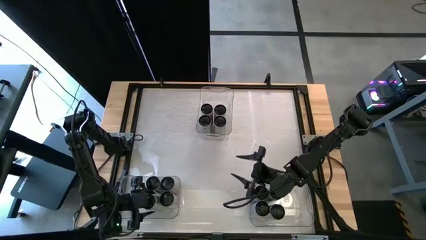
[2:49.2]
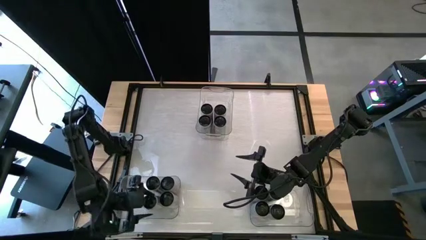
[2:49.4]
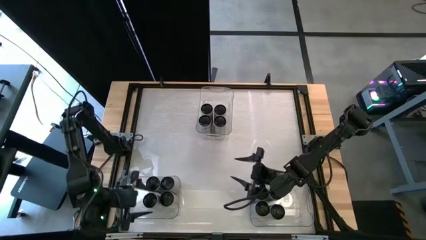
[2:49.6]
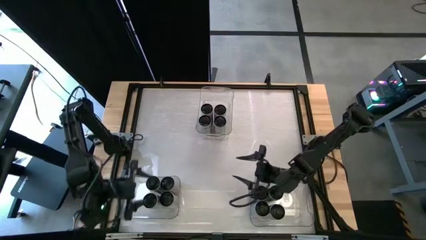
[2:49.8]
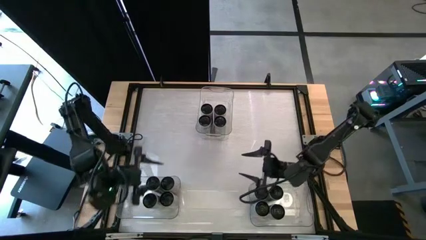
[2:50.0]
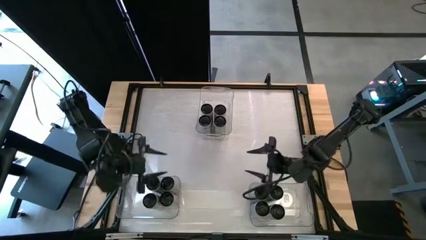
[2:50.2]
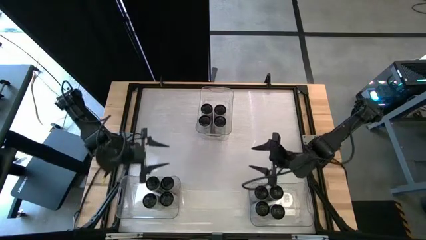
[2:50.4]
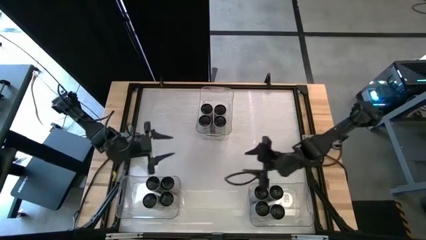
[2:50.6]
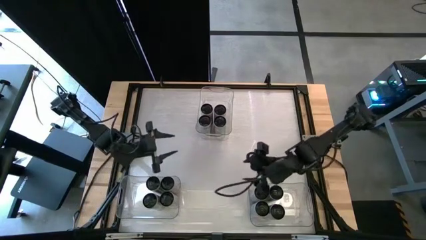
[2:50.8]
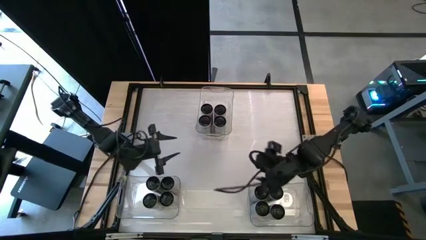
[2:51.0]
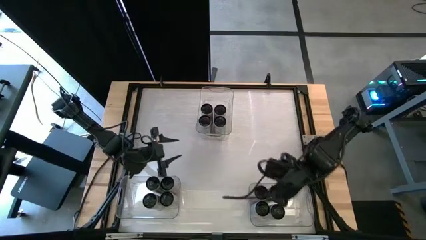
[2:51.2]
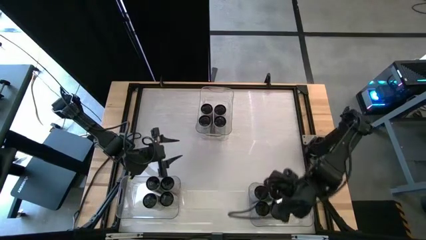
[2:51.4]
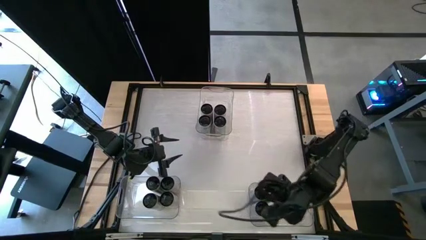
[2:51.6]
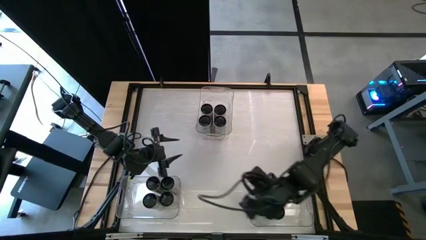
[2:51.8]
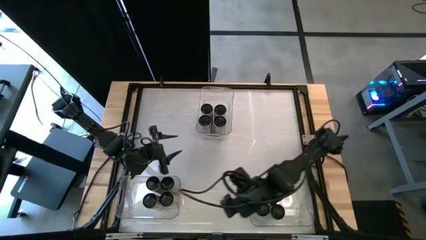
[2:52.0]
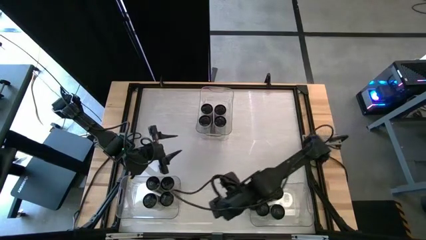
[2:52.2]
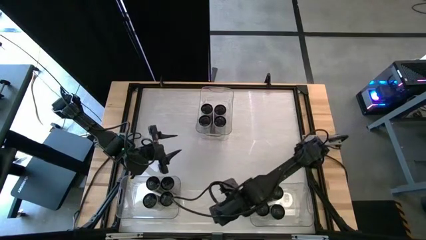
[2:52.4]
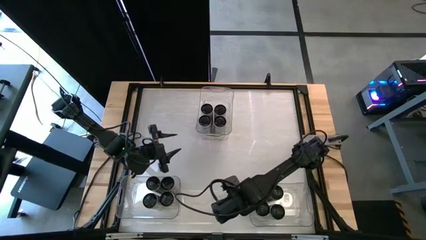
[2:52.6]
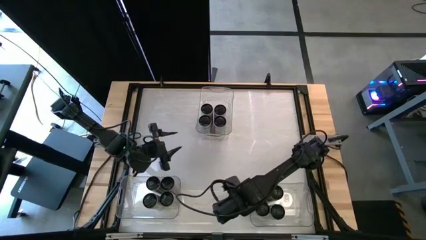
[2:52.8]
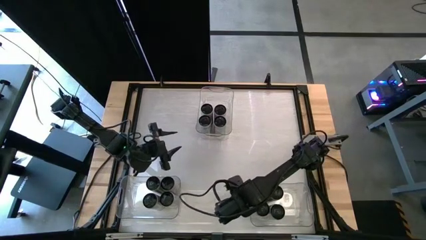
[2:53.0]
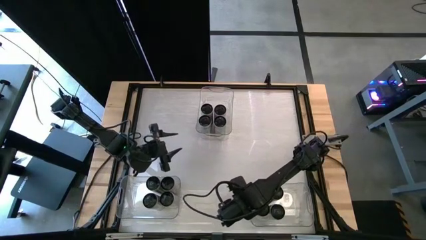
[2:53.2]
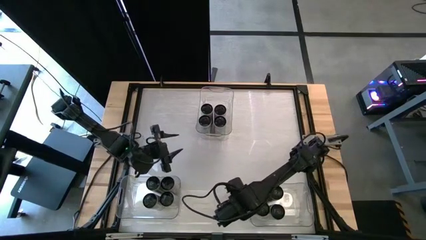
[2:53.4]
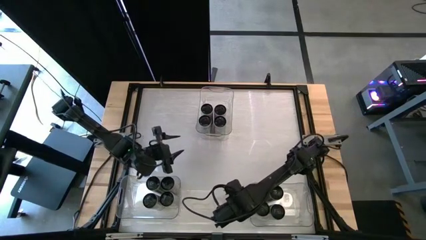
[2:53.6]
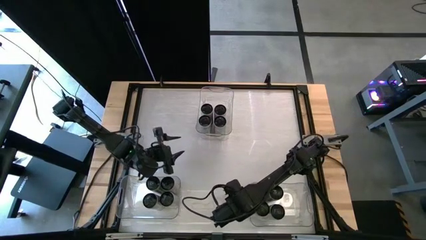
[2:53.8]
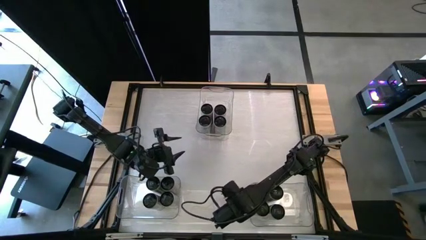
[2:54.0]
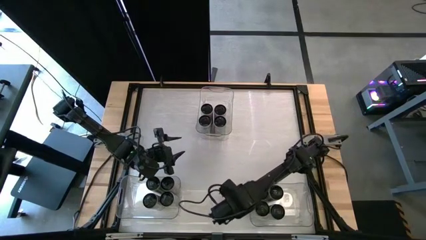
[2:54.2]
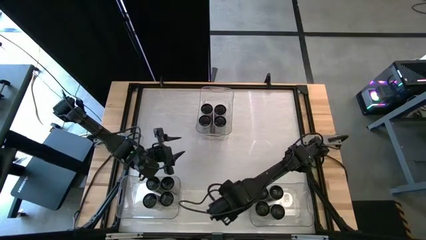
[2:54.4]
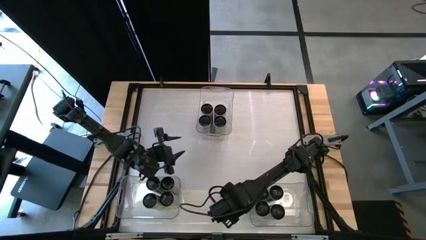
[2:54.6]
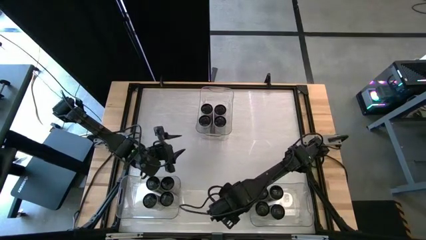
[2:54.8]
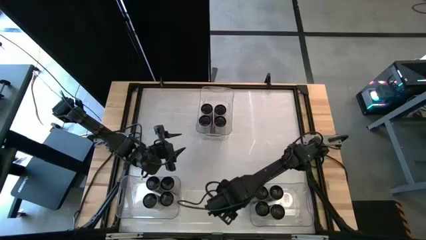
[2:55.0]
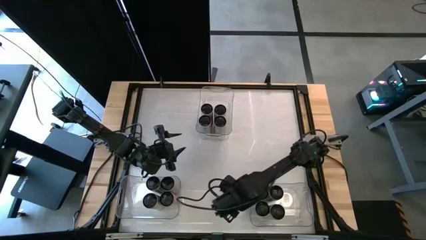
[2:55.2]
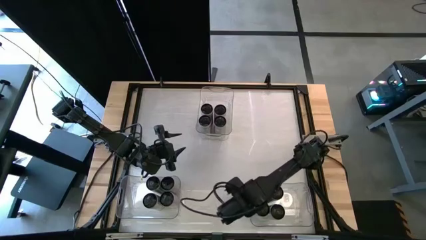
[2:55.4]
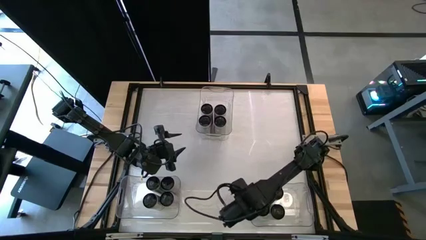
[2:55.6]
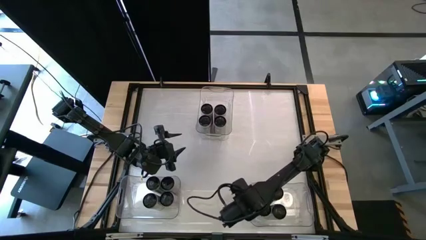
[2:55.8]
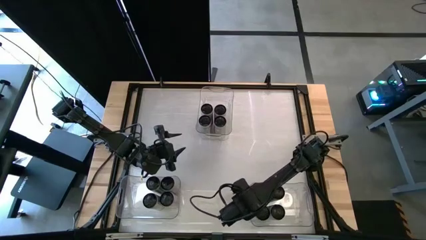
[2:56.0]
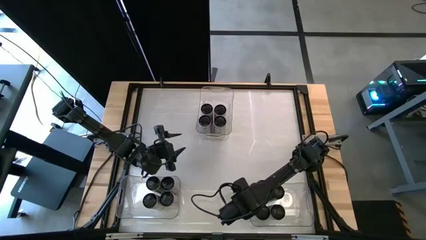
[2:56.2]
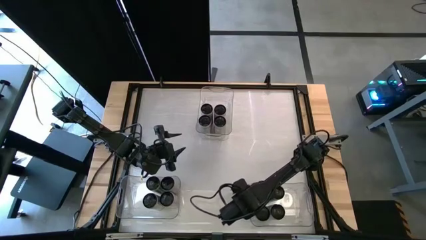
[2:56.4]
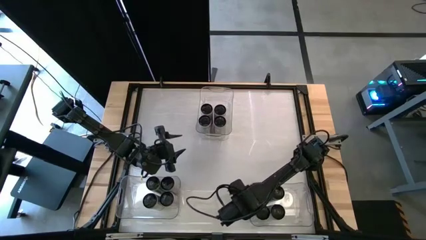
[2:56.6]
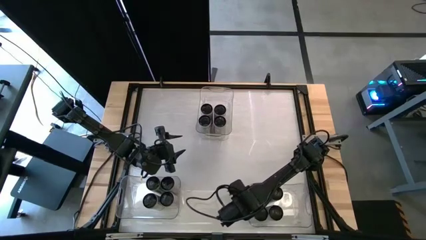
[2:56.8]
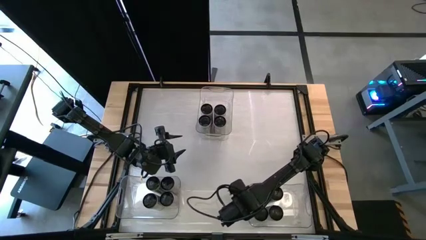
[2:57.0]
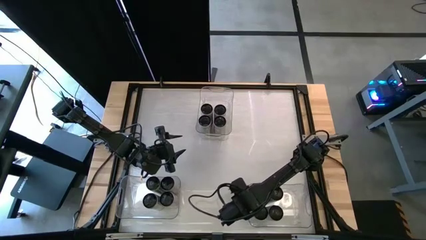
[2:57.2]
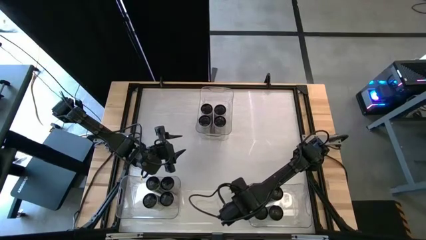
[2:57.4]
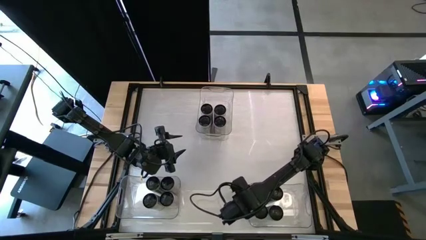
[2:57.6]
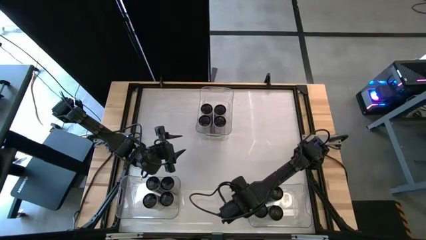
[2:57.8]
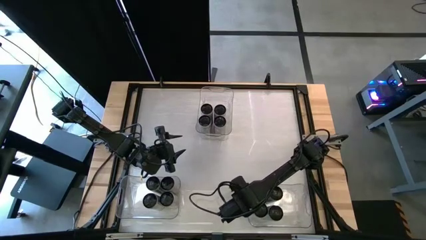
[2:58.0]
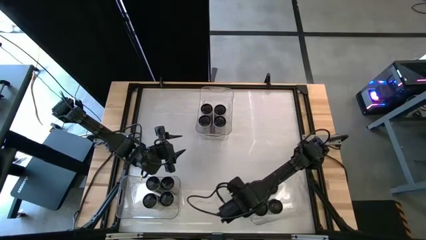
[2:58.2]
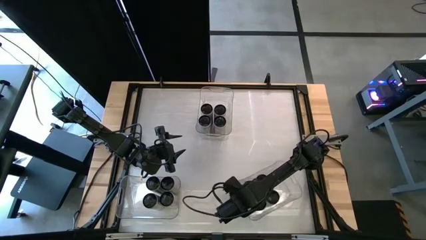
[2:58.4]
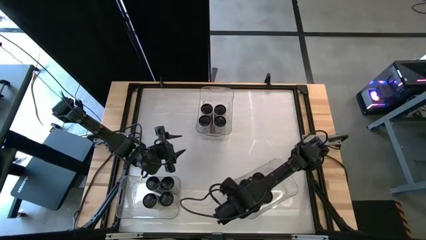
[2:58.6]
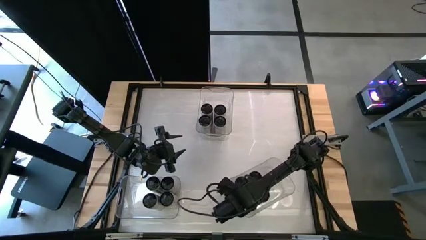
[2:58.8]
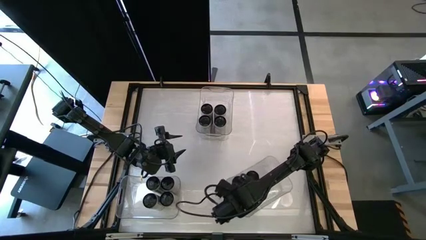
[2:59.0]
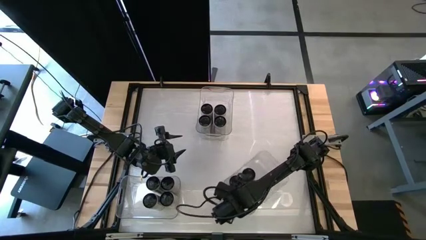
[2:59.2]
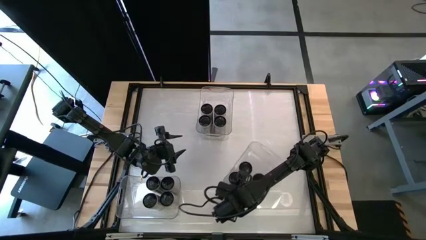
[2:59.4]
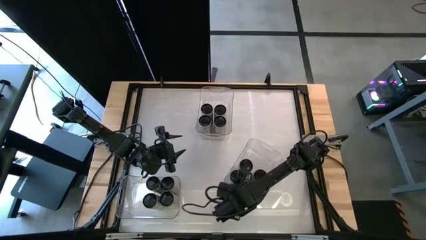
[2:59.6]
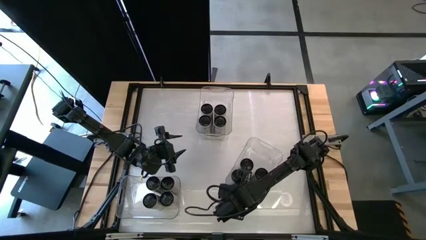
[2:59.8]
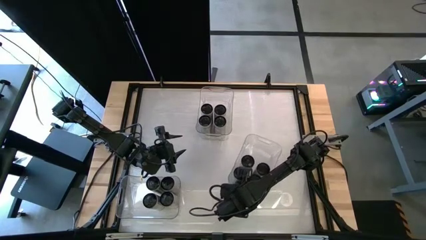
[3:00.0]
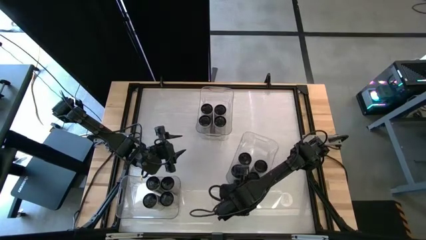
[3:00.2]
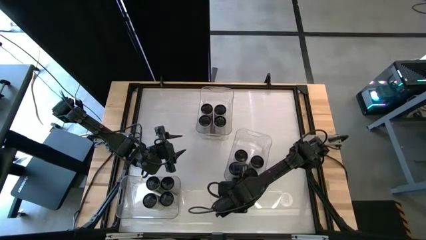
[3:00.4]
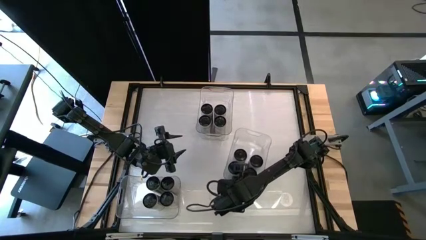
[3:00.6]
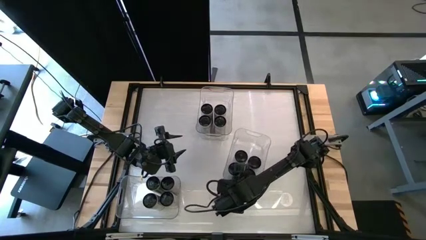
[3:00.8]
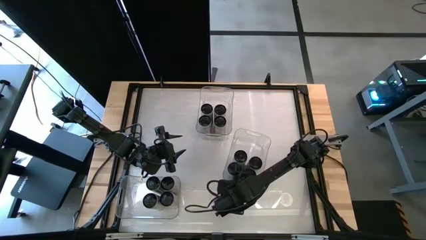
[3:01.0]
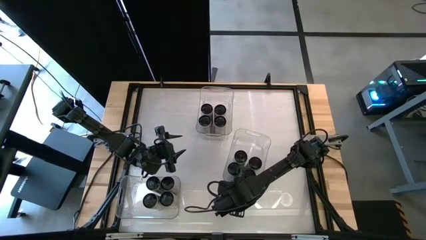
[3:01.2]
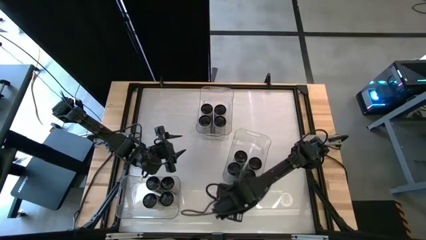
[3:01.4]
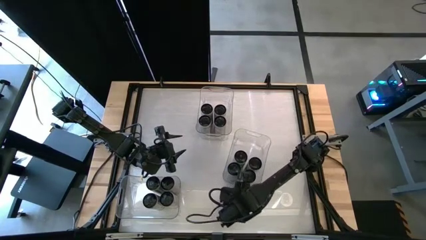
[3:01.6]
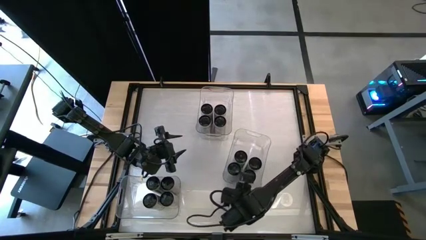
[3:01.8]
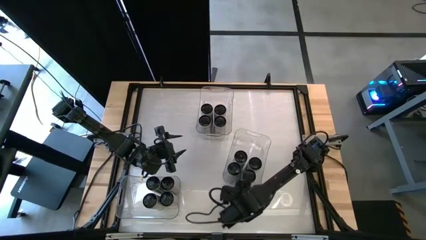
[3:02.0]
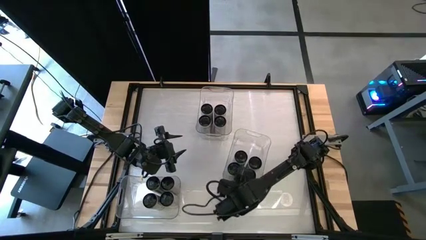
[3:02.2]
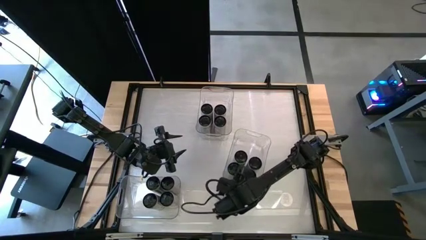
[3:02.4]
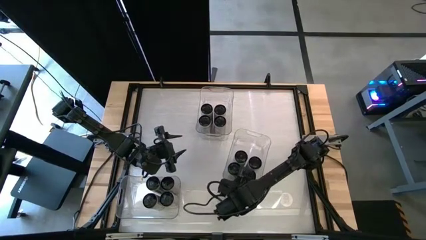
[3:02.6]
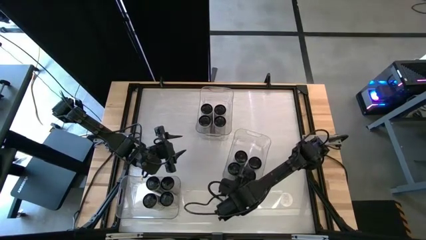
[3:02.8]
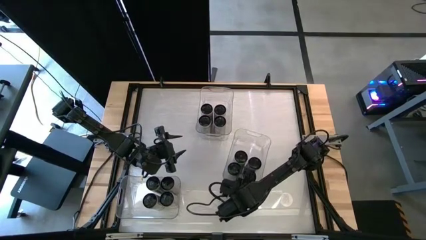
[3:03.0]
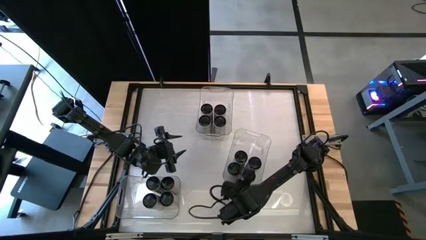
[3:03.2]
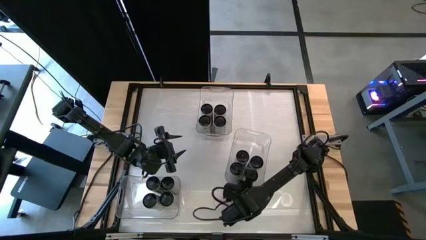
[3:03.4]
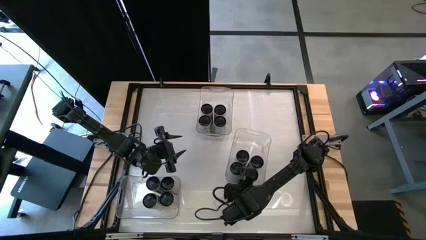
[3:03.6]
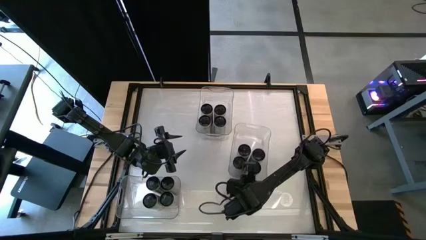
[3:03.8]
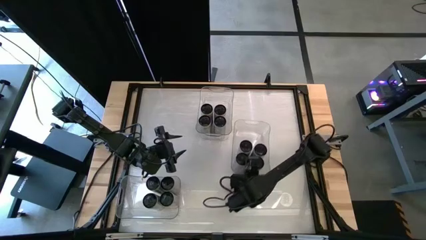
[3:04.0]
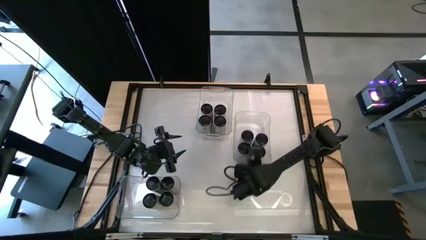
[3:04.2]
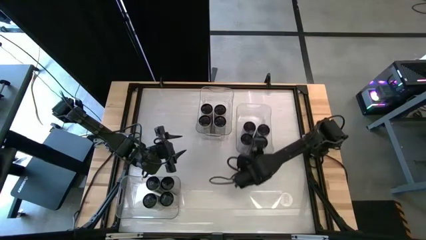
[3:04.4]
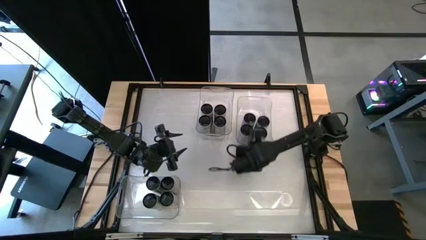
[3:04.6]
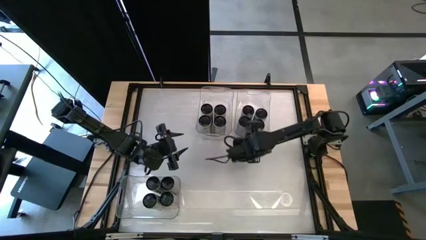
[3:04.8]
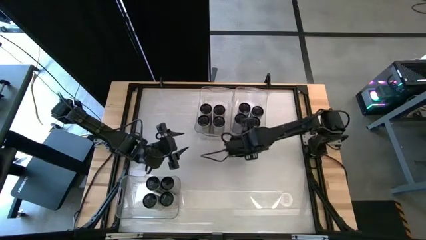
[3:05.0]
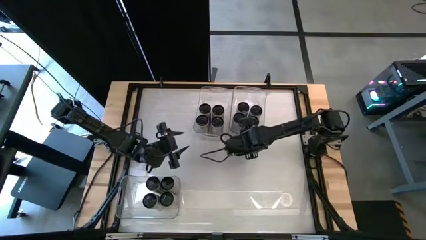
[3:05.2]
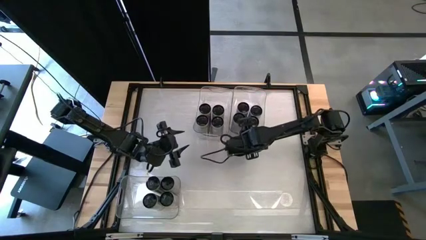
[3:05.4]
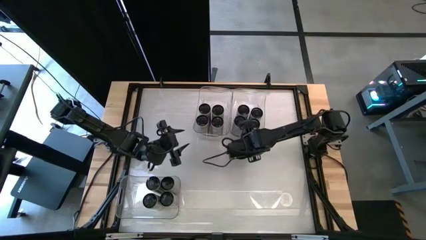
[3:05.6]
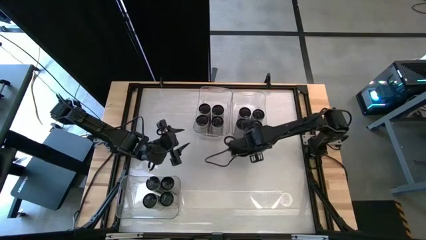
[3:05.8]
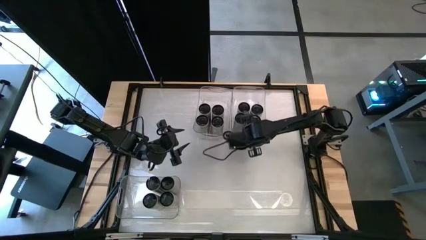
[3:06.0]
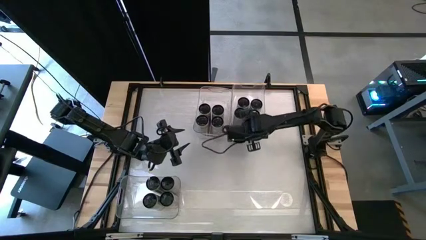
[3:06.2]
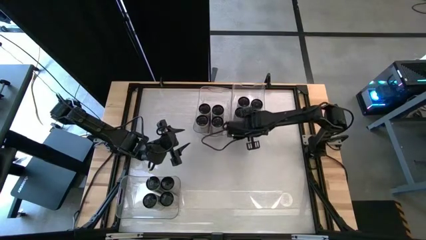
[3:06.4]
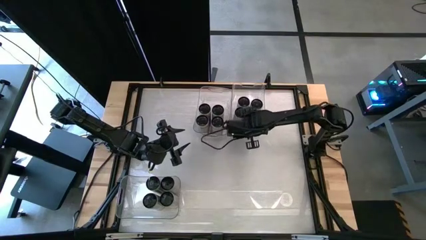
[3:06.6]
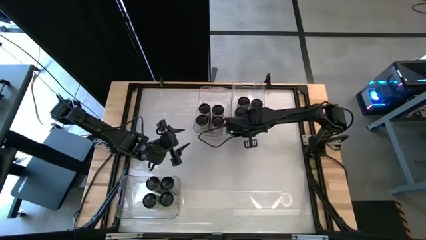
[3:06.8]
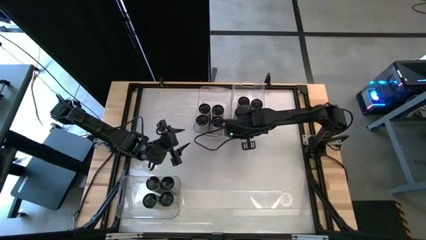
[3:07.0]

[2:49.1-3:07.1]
Task: Sort soda cans
Move the bottom right transparent bin to the right side of top middle transparent bin
